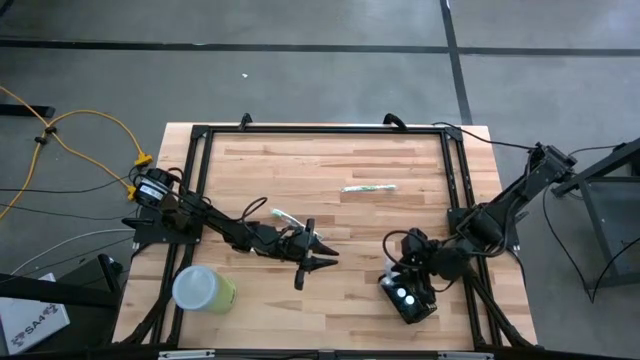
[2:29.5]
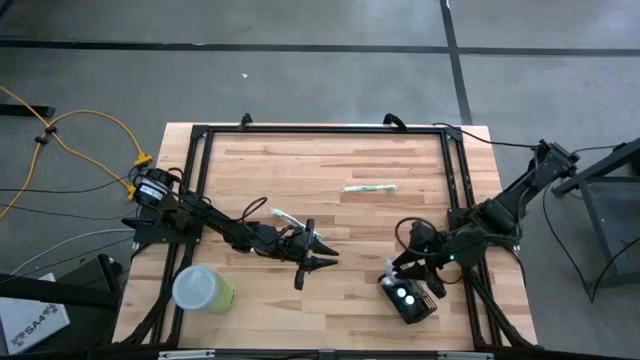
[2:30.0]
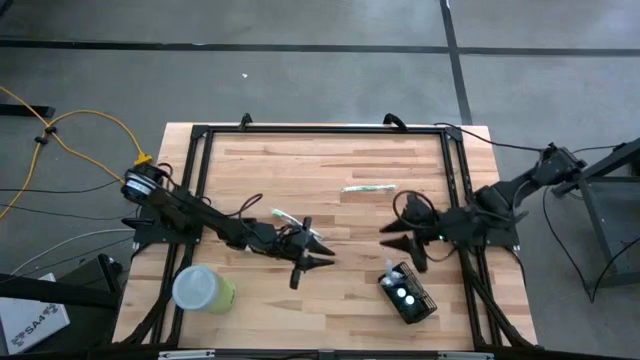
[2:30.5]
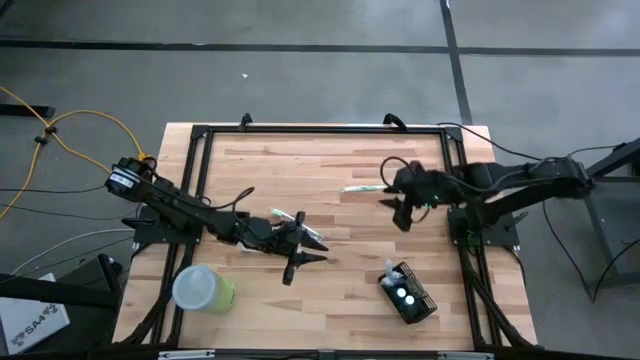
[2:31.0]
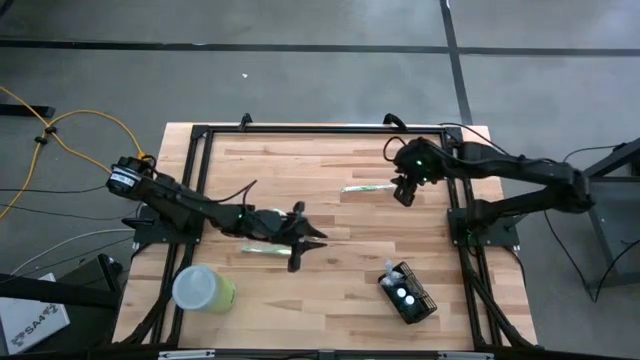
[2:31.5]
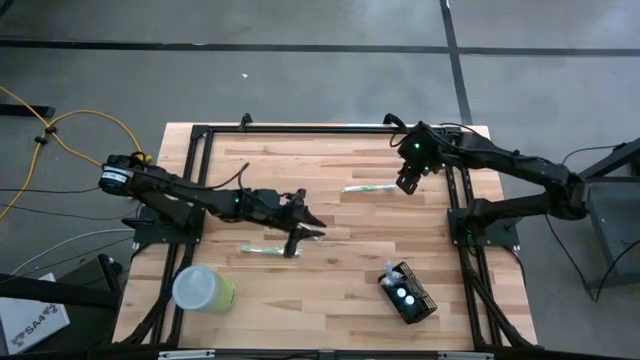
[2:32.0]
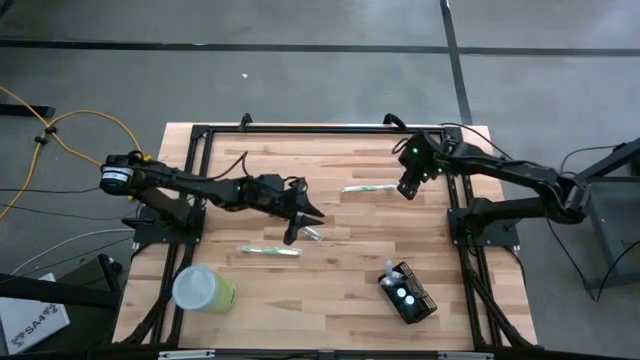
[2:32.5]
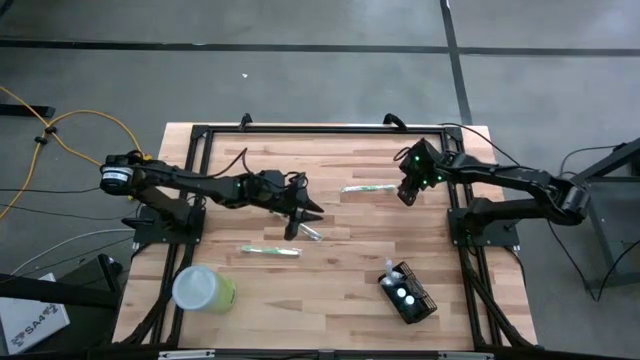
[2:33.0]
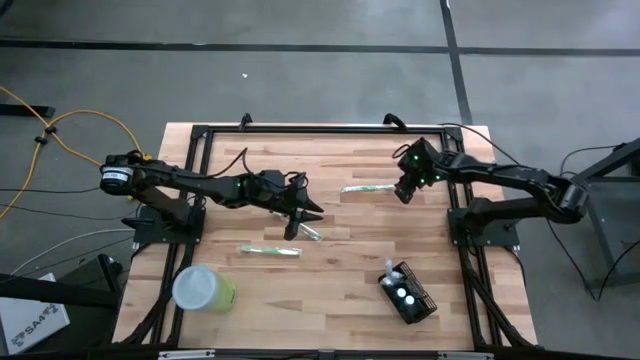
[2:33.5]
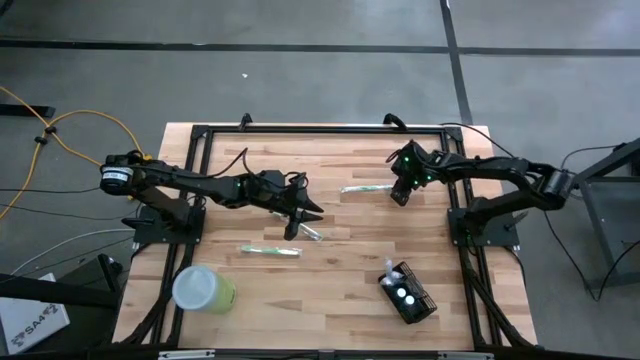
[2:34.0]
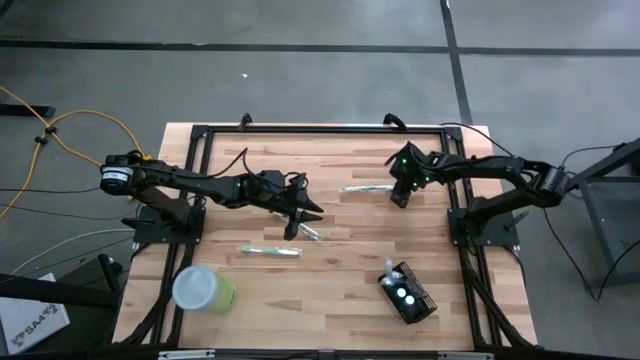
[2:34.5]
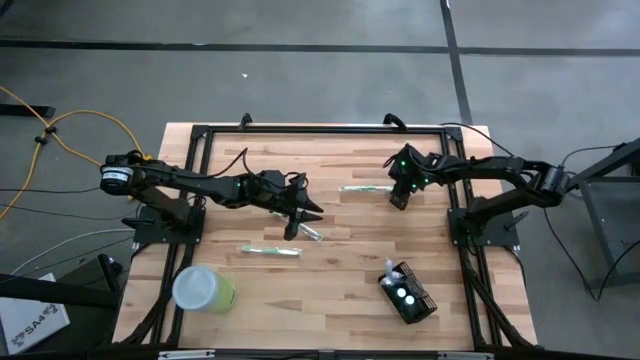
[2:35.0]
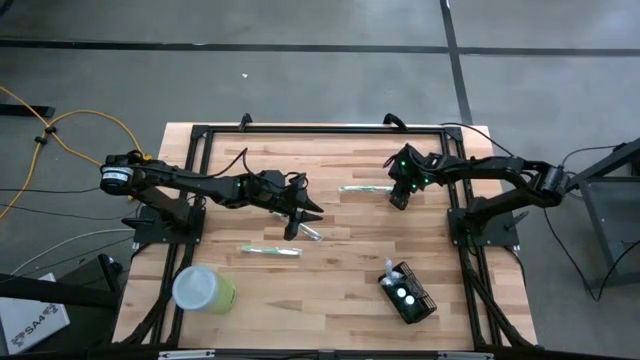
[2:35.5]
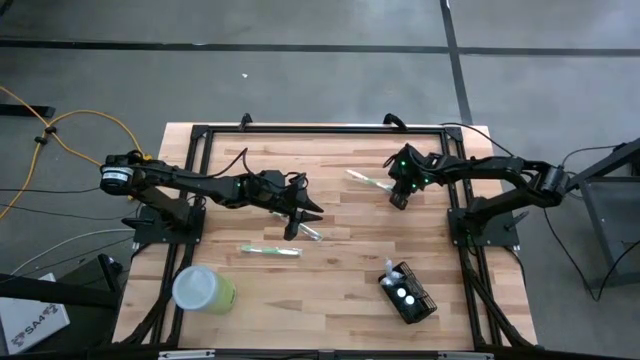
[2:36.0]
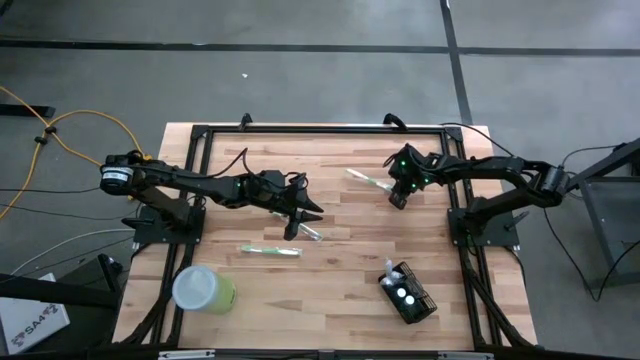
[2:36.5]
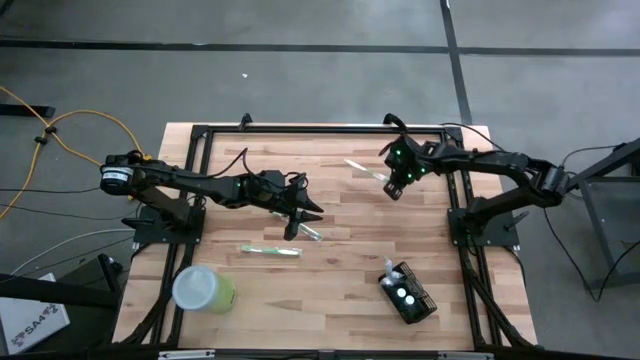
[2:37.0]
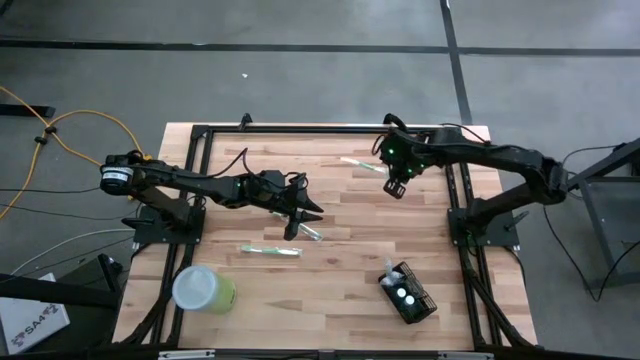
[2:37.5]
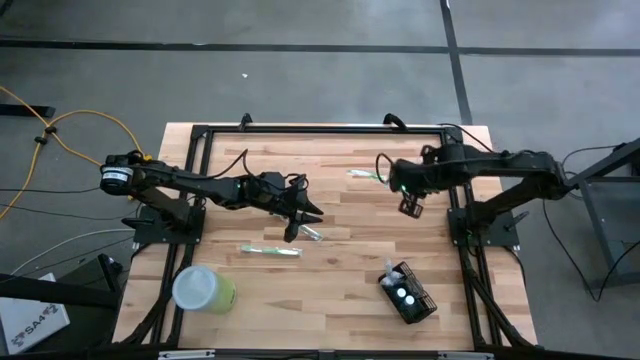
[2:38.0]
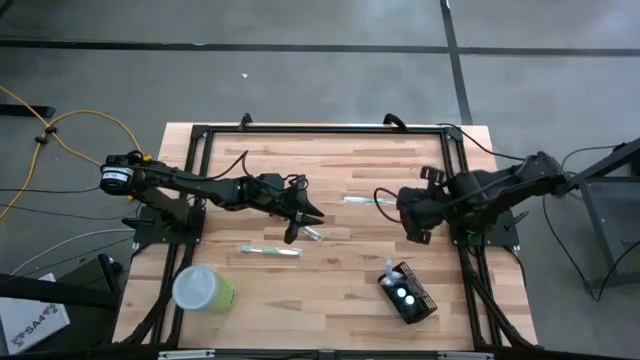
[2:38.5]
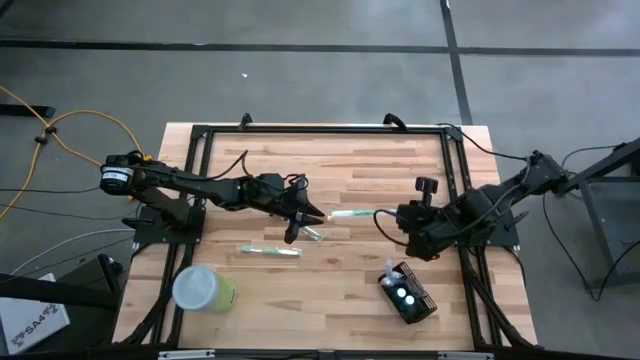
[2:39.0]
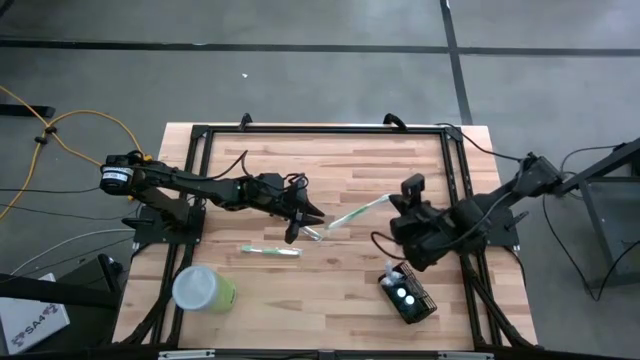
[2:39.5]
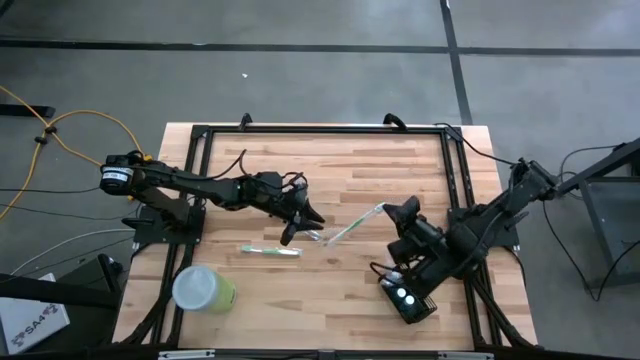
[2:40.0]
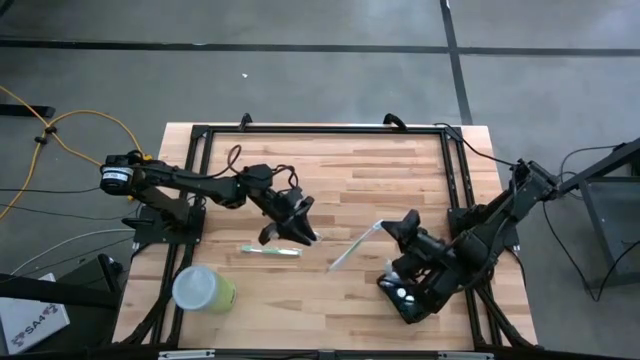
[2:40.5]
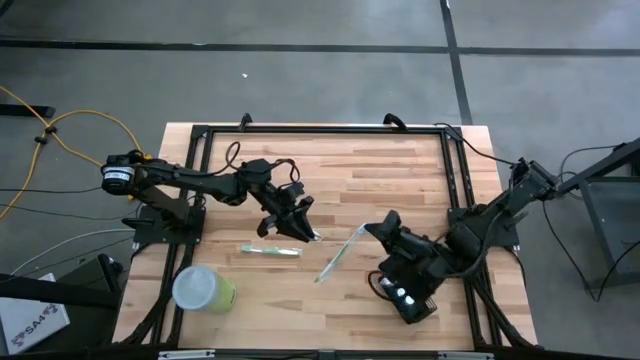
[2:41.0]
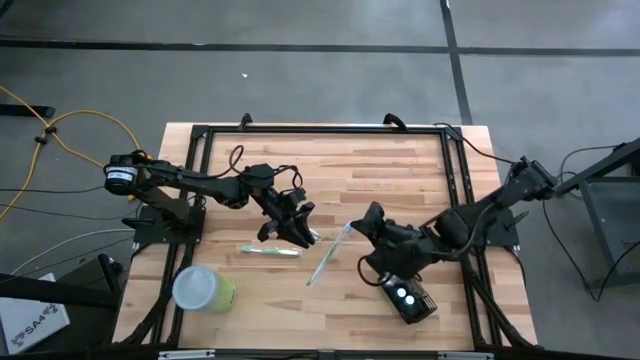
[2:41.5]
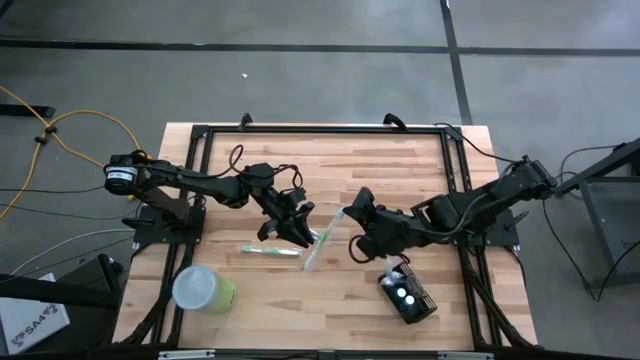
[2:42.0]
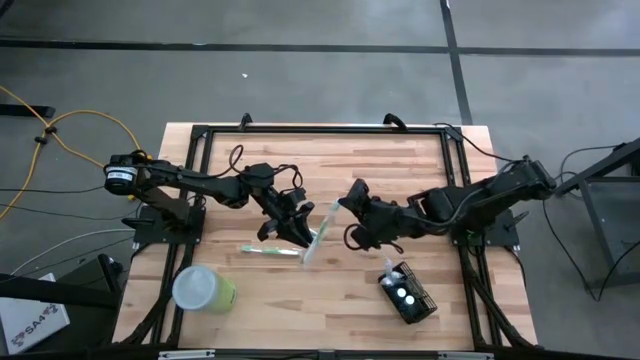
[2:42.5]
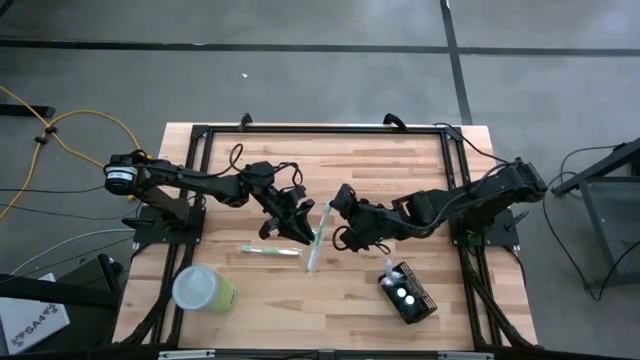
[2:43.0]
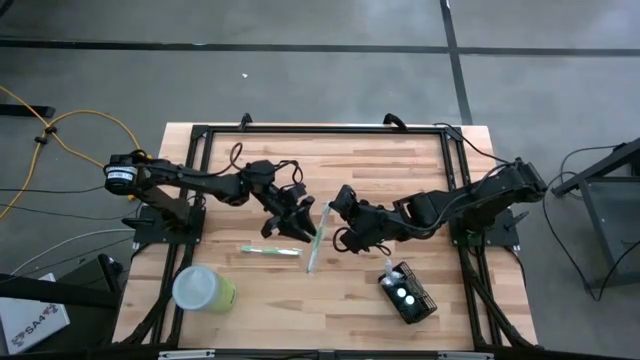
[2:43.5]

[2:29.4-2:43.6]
Task: Pick & Place toothbrushing station
Put the top green toothbrush into the bottom section of the black wire organizer

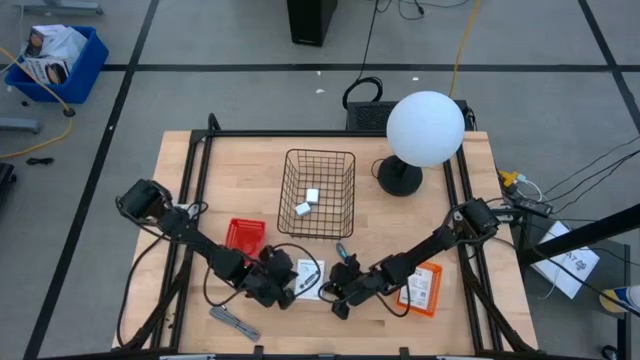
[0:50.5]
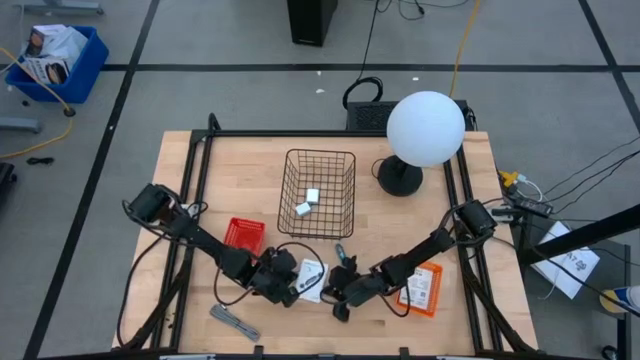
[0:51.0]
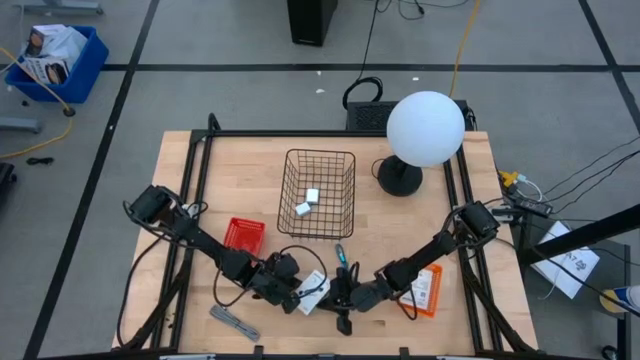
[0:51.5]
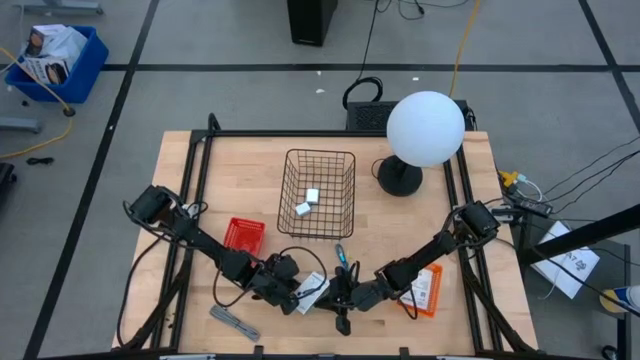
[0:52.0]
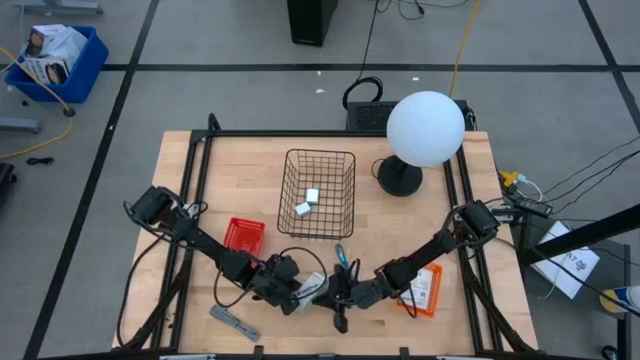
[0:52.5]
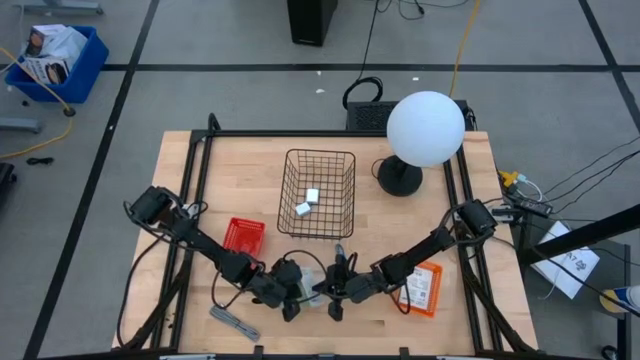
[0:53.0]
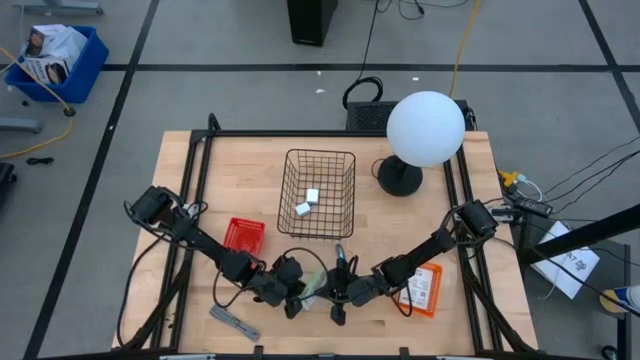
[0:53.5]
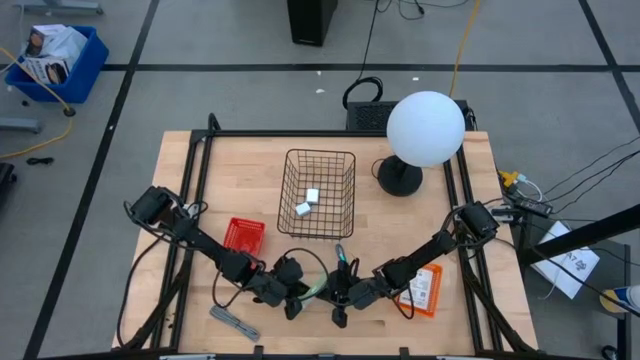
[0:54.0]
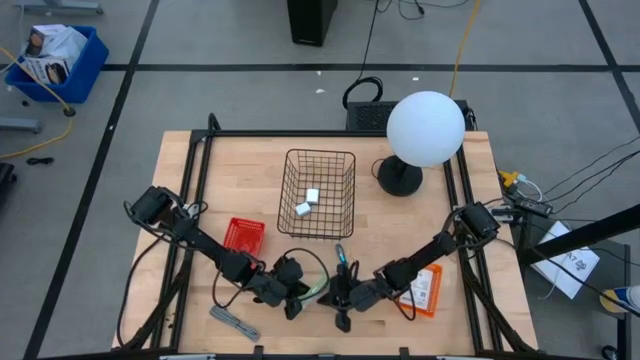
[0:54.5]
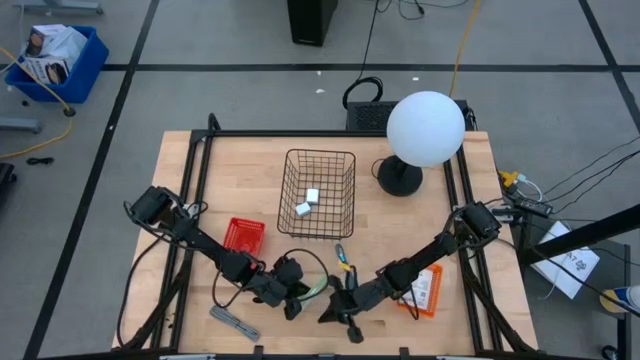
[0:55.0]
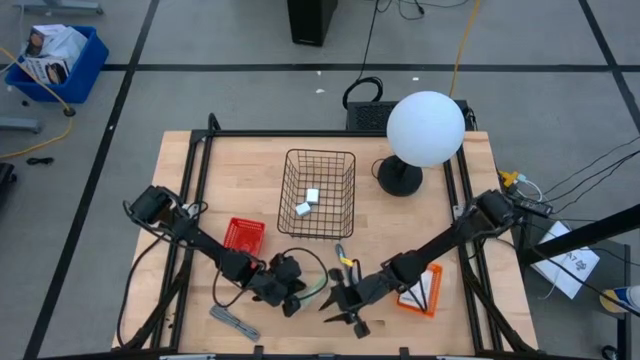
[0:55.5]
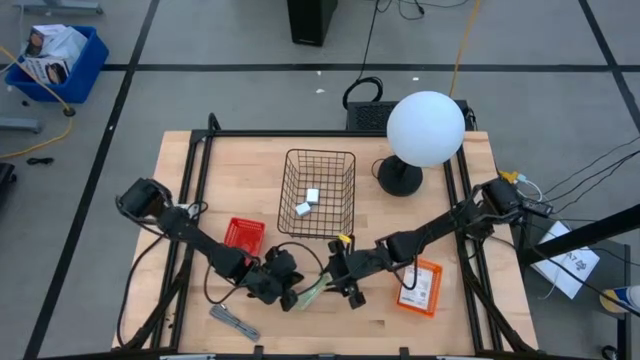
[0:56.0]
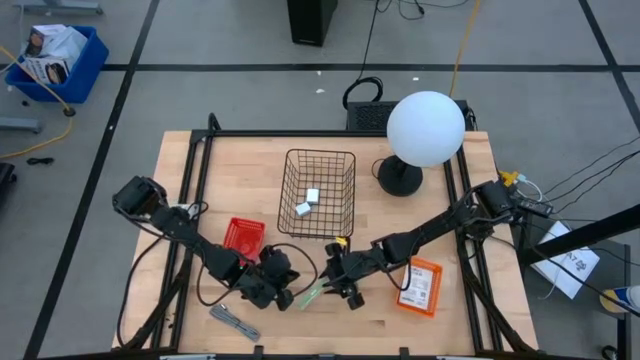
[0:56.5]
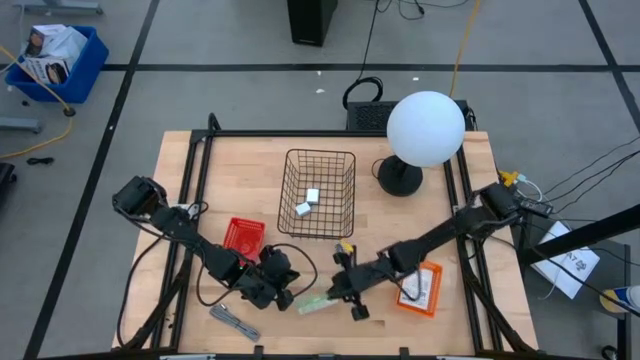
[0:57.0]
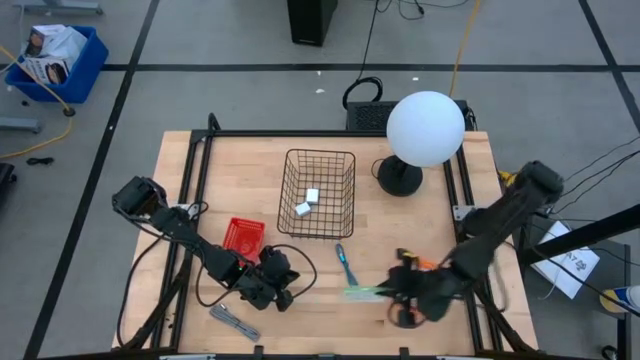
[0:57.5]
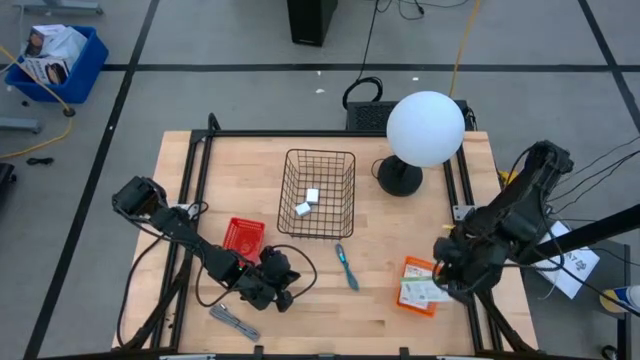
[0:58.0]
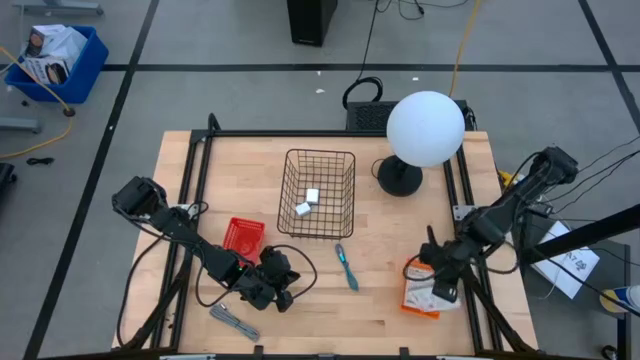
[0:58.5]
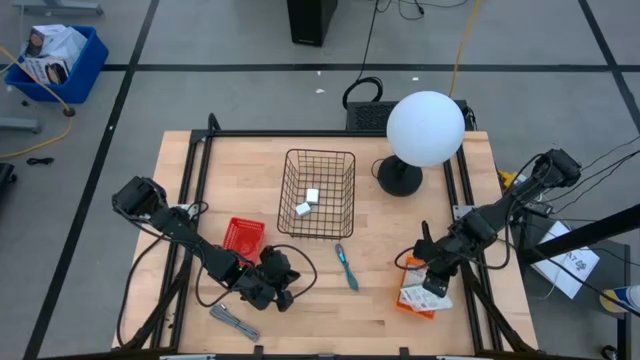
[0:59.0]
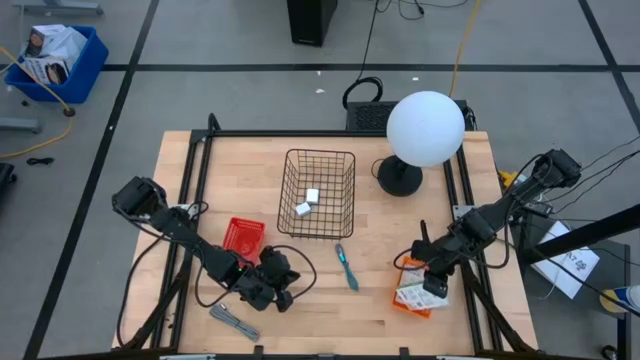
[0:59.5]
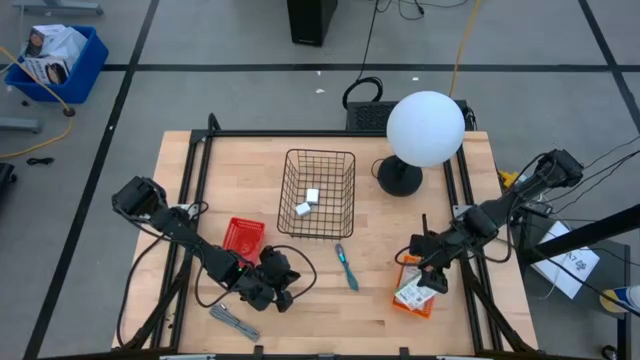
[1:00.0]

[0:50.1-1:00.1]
Task: Pick and place items into bin
Put the card reader box into the orange basket
